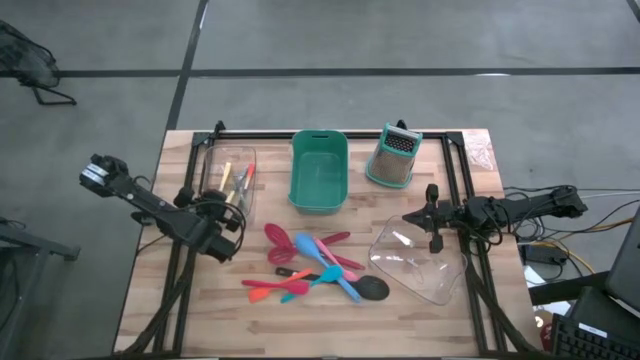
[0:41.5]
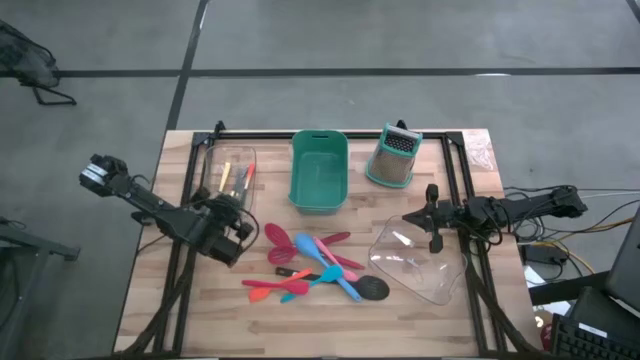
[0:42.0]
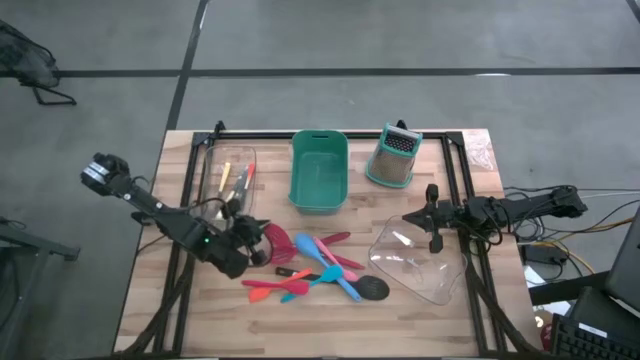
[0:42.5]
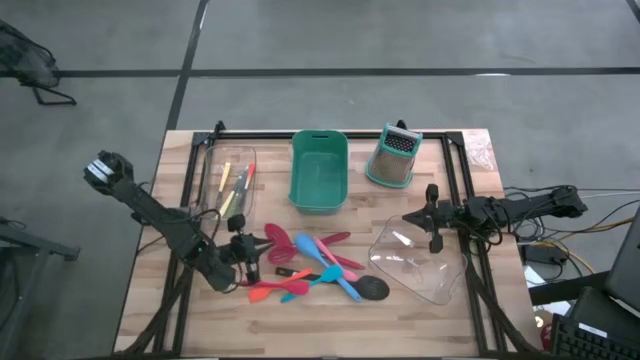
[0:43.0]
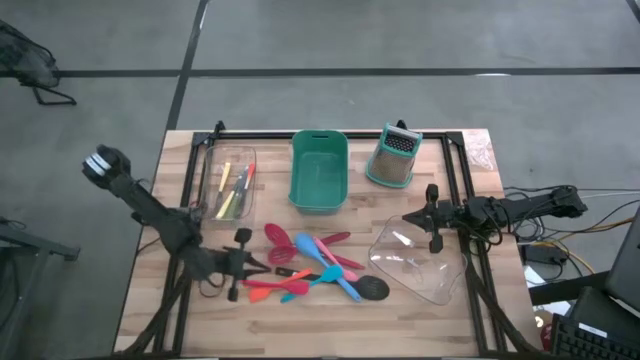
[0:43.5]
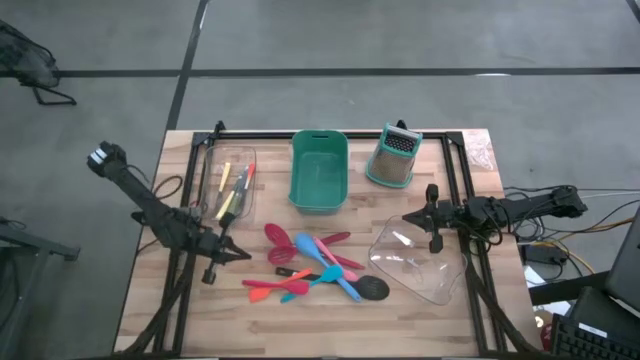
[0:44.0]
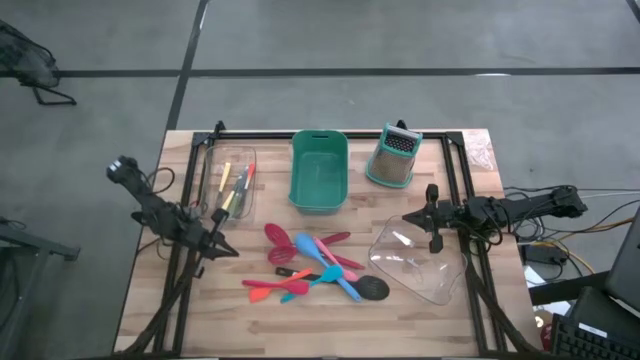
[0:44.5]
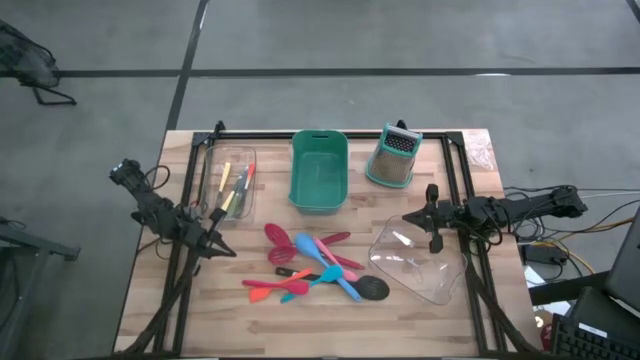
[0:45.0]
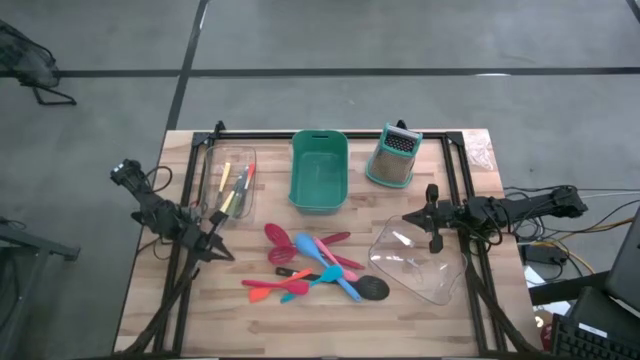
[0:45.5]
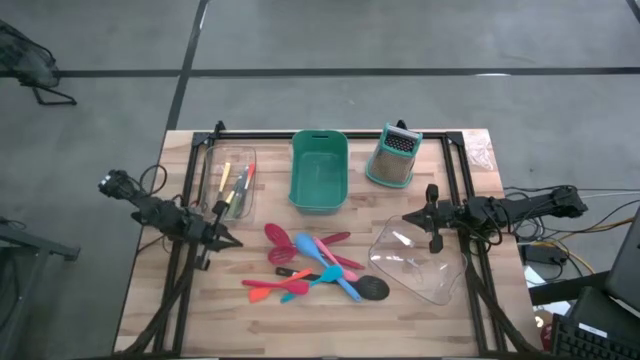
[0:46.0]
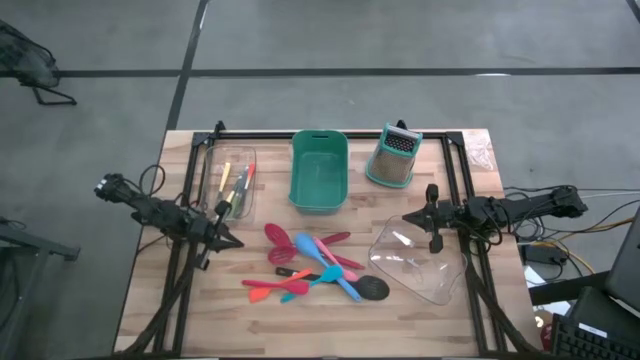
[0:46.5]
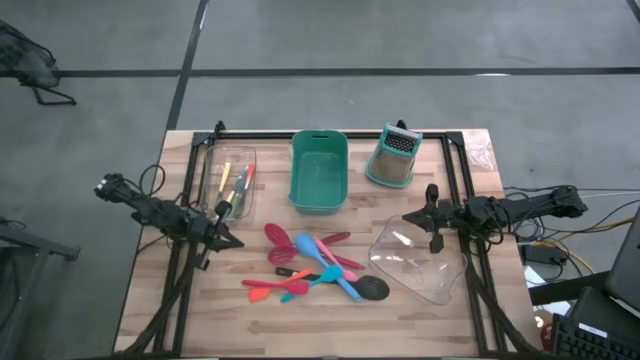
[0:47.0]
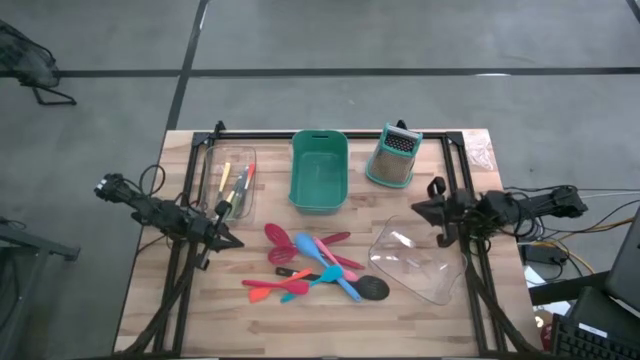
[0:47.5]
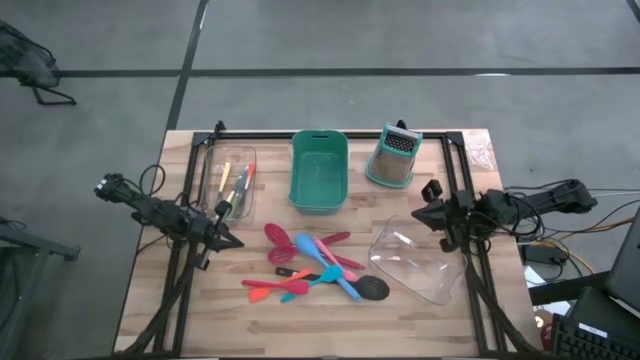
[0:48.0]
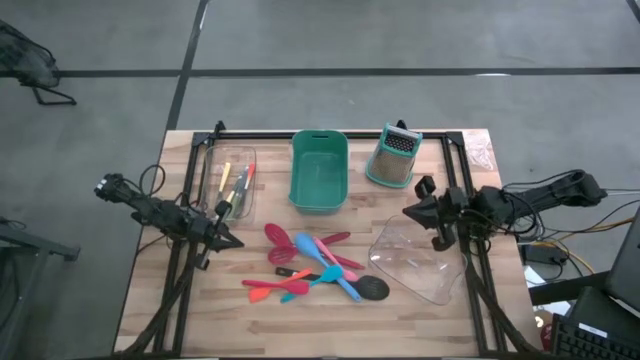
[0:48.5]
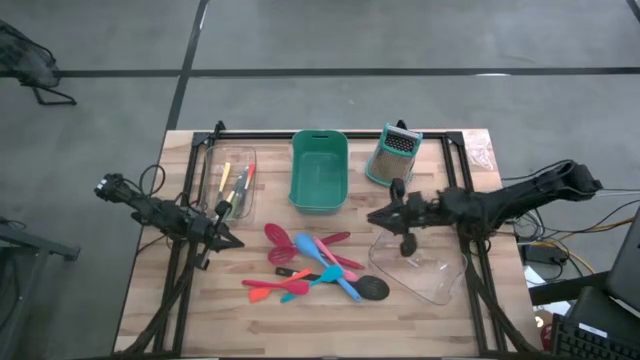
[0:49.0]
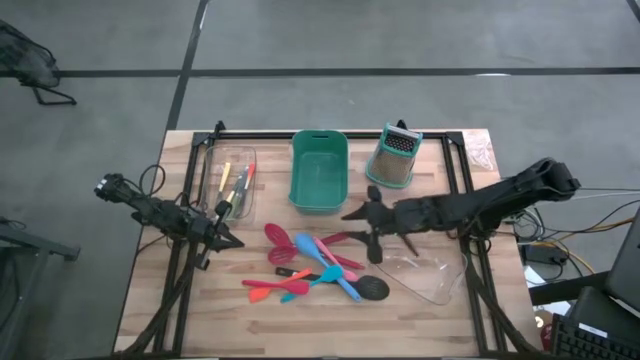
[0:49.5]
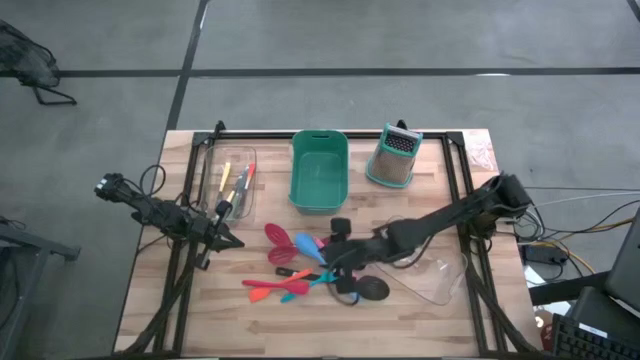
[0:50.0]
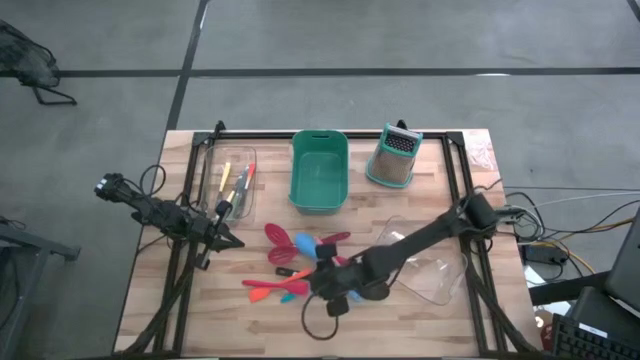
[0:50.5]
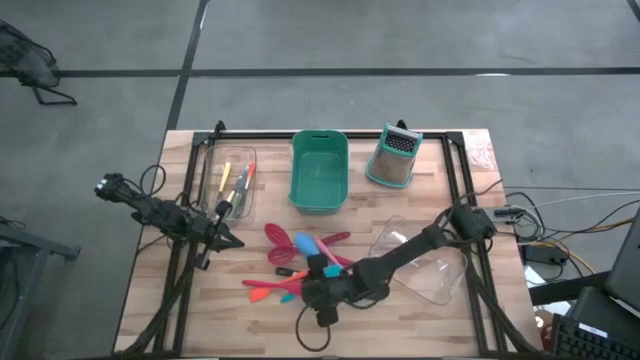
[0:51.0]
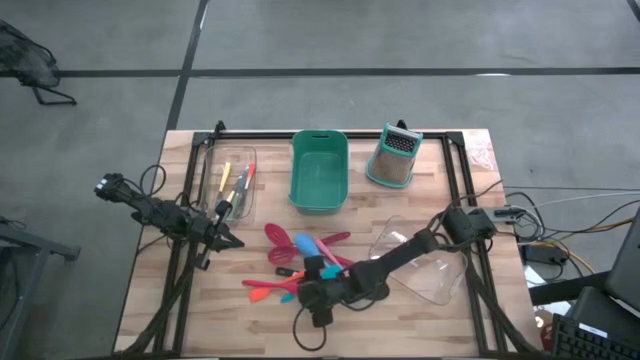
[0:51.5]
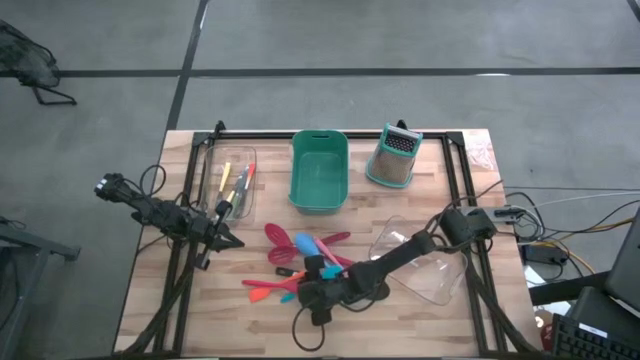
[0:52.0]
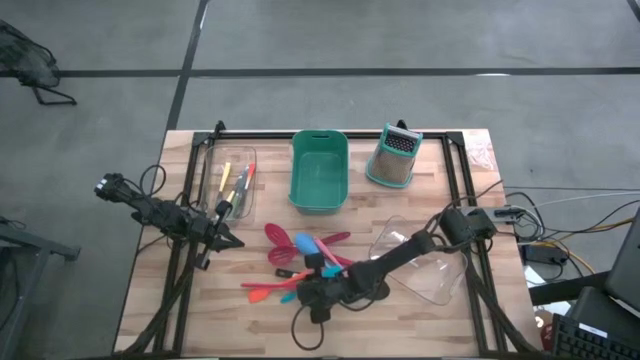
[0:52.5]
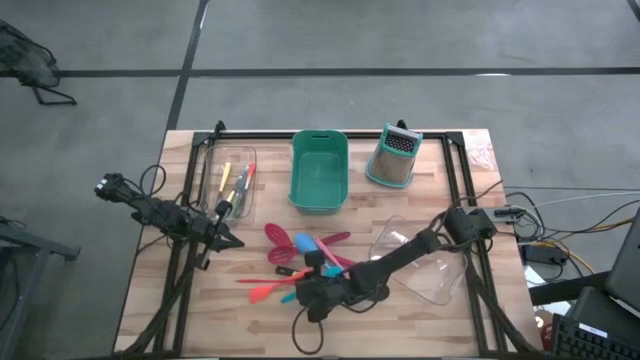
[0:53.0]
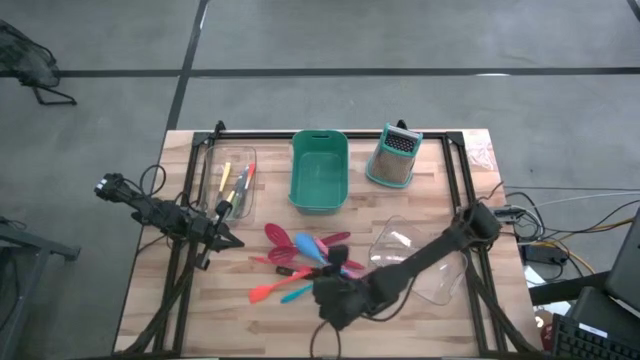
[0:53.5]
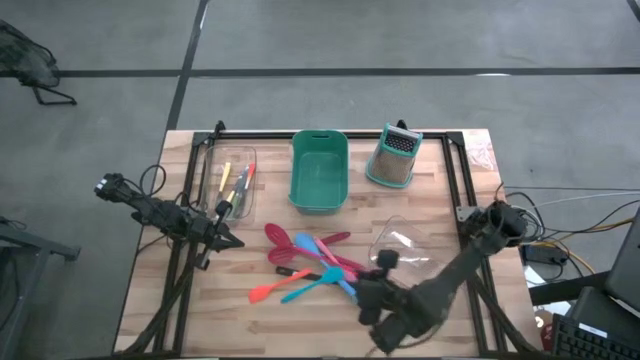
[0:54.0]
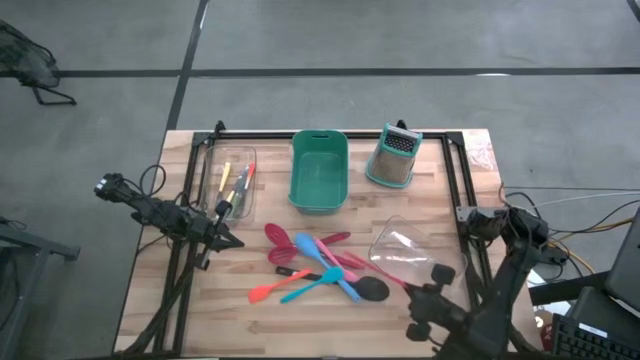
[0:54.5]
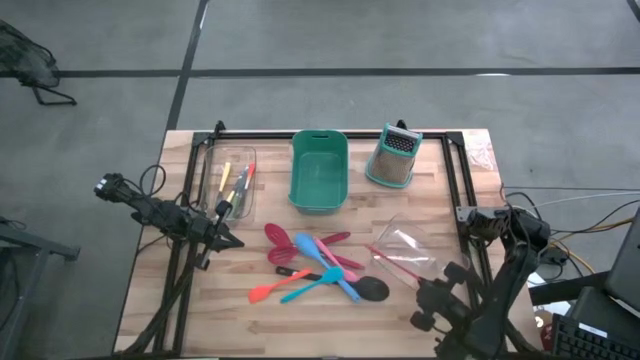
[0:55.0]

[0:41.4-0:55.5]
Task: Pick & Place Kitchen Items
Put the red spatula into the bottom transparent bin

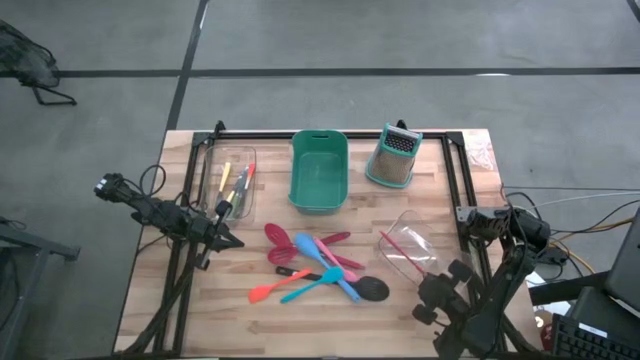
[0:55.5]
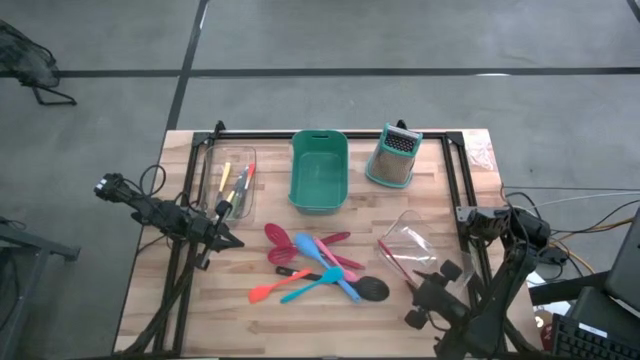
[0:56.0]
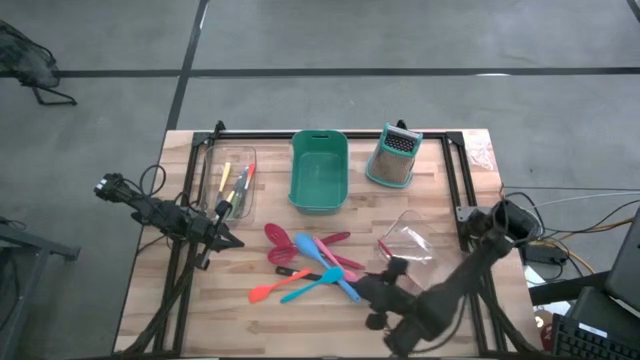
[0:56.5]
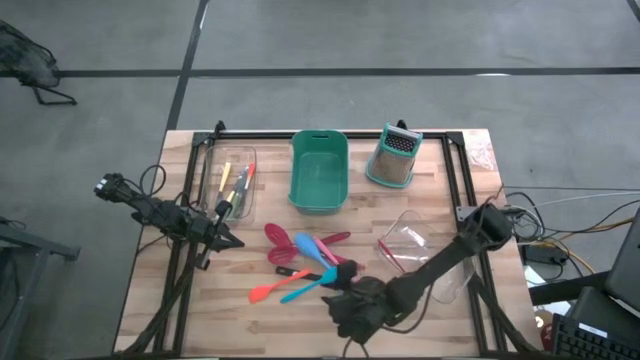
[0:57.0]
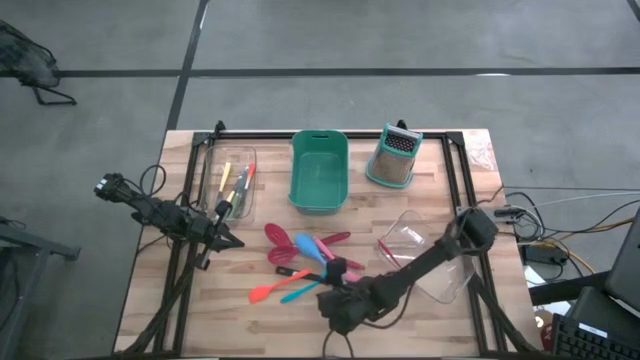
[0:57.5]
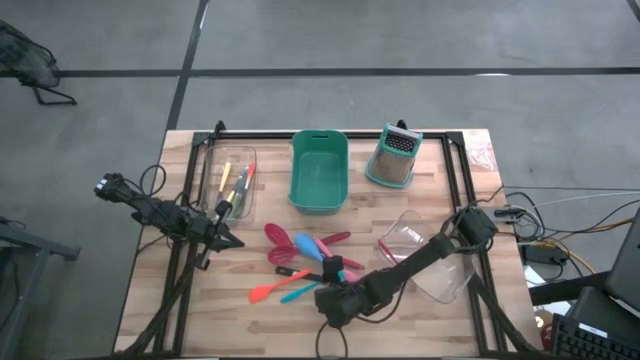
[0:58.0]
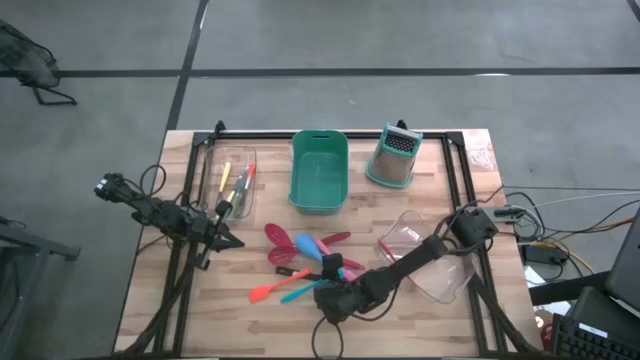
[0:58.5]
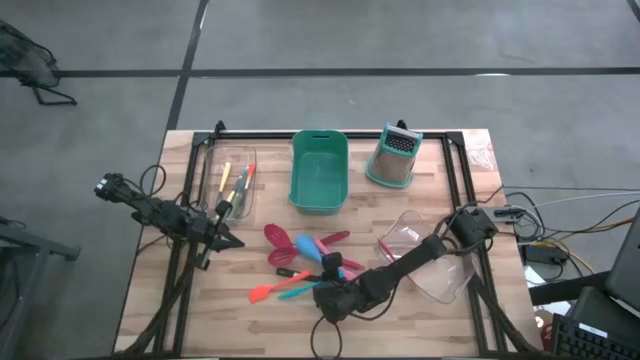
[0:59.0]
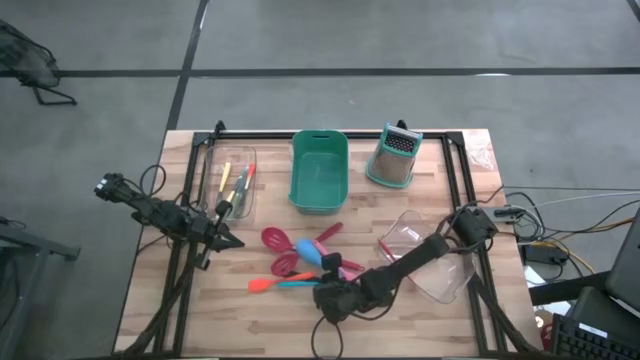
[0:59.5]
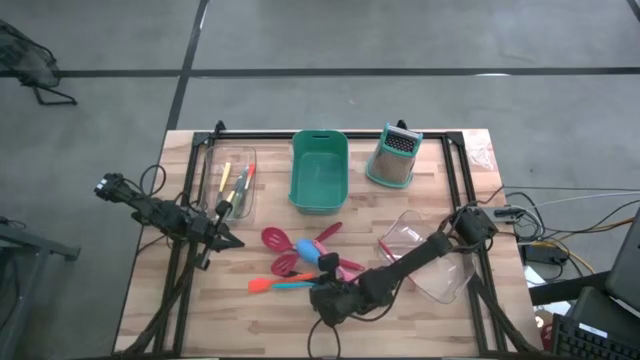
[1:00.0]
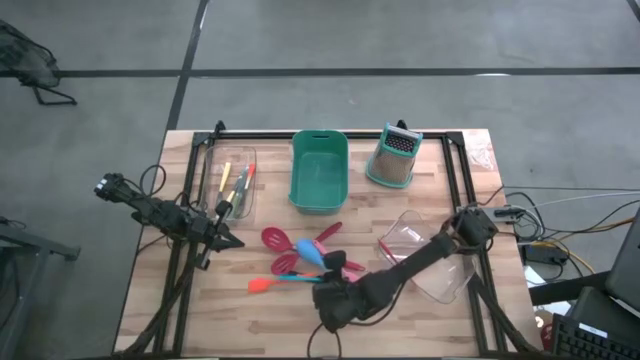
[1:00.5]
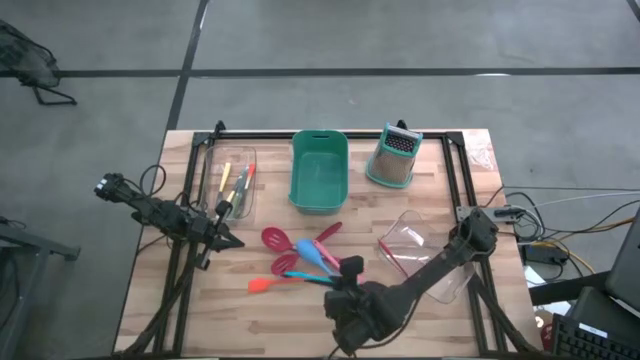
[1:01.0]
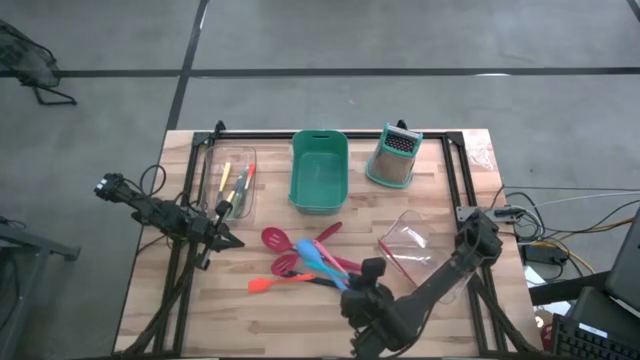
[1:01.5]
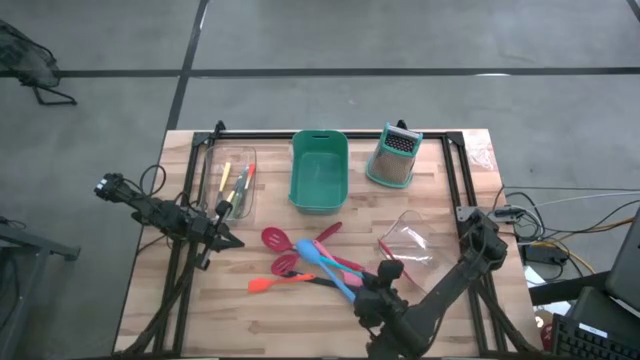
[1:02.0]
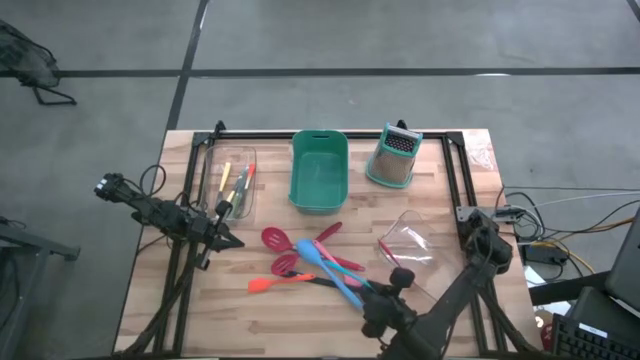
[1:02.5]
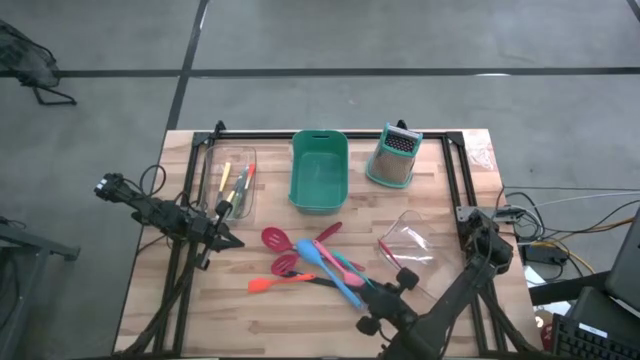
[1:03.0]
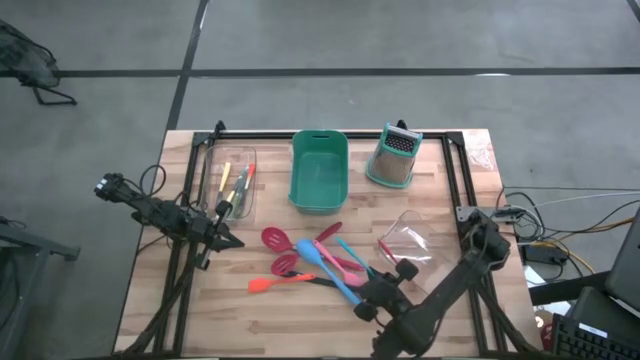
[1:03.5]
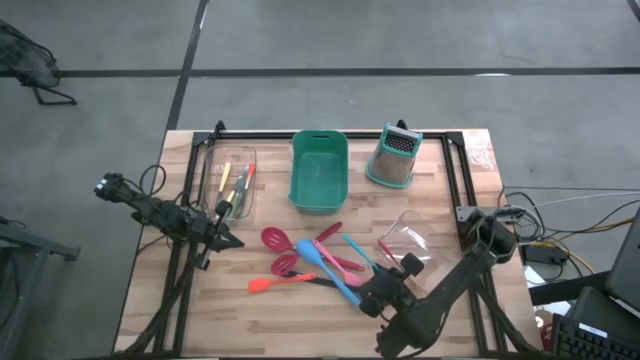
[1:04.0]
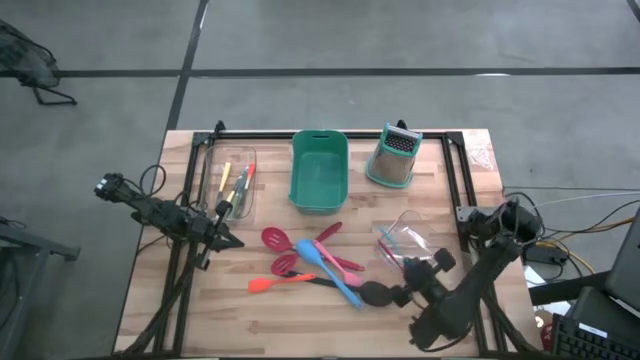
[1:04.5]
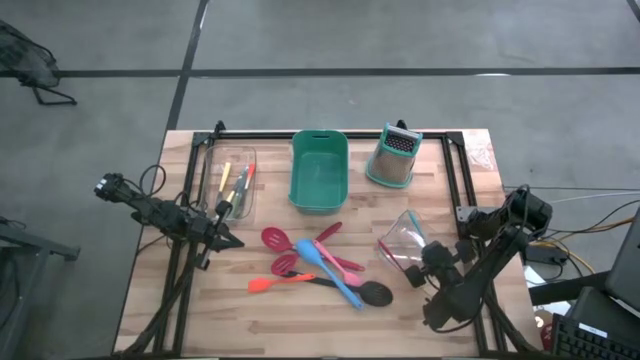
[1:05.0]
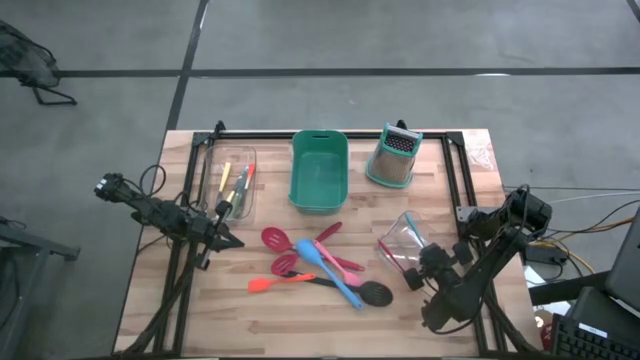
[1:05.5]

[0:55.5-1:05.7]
Put the blue spatula into the bottom transparent bin
